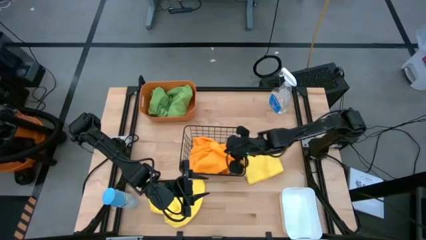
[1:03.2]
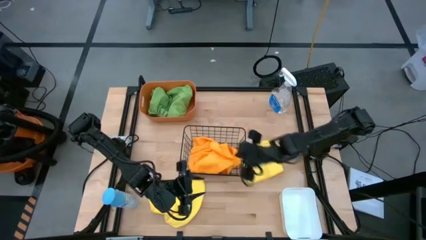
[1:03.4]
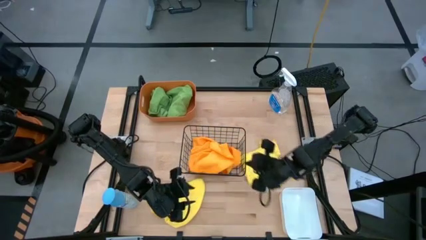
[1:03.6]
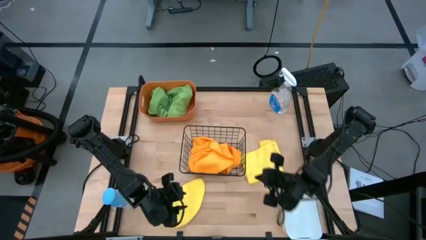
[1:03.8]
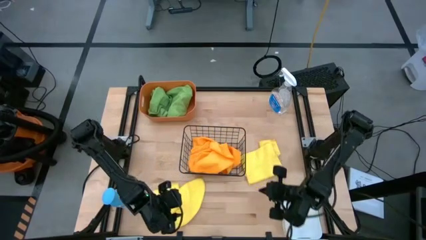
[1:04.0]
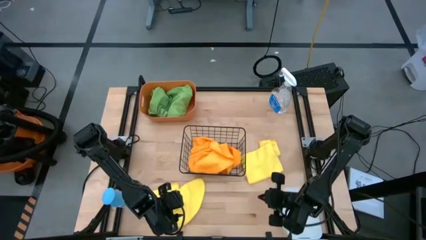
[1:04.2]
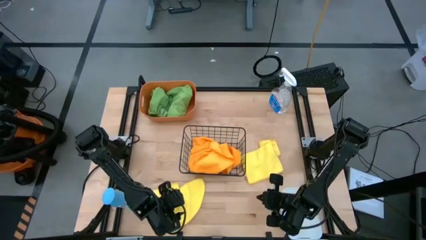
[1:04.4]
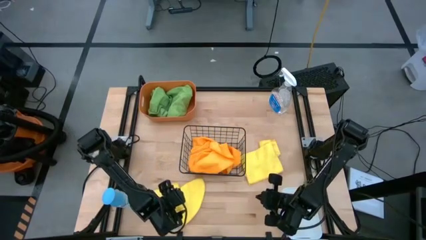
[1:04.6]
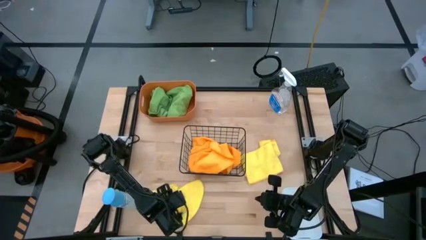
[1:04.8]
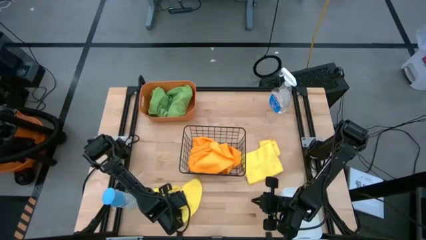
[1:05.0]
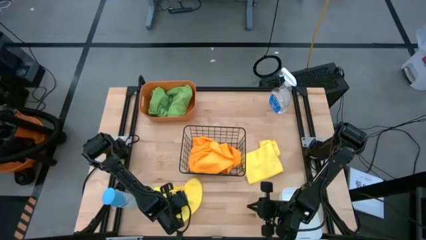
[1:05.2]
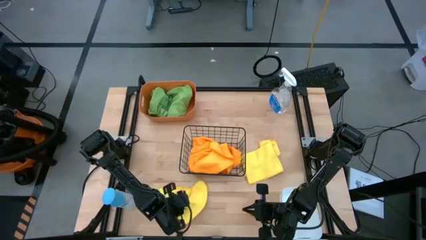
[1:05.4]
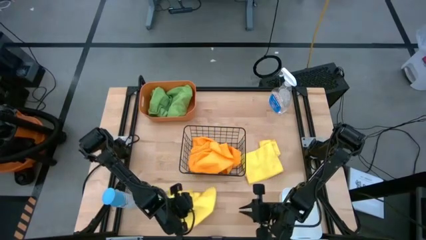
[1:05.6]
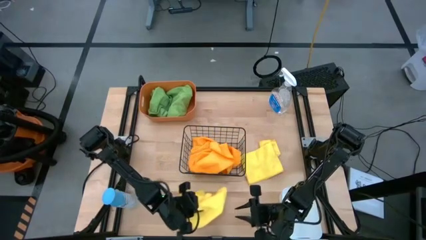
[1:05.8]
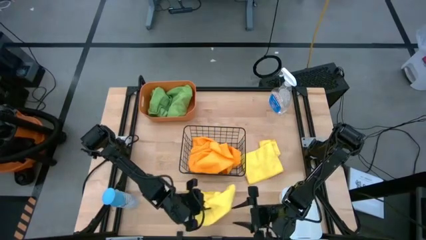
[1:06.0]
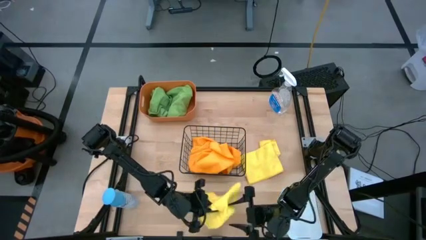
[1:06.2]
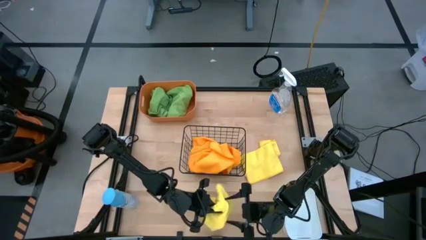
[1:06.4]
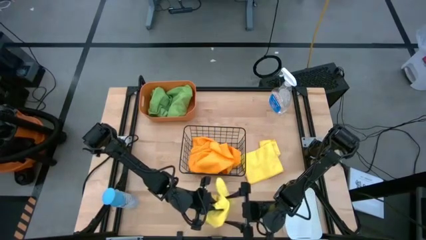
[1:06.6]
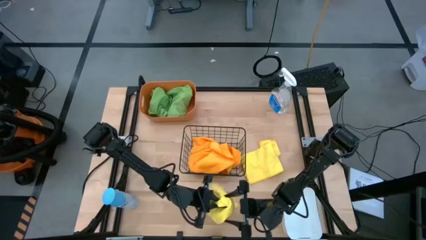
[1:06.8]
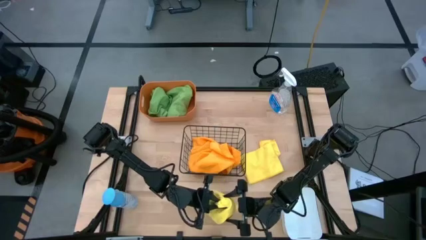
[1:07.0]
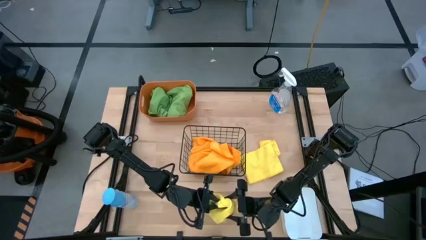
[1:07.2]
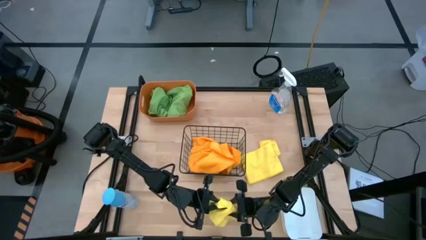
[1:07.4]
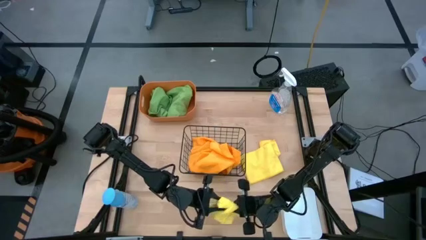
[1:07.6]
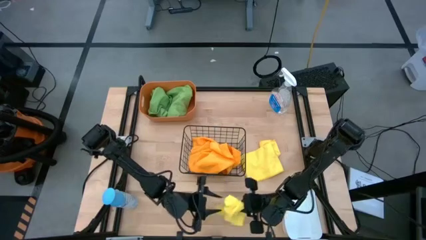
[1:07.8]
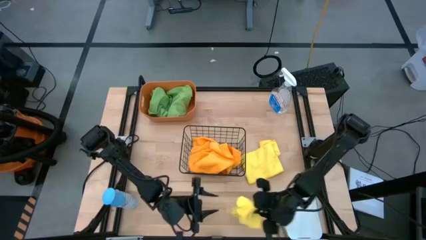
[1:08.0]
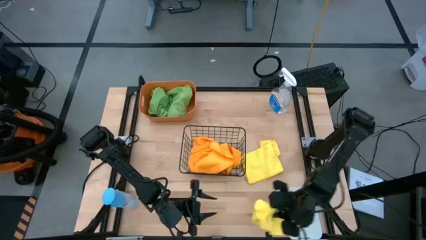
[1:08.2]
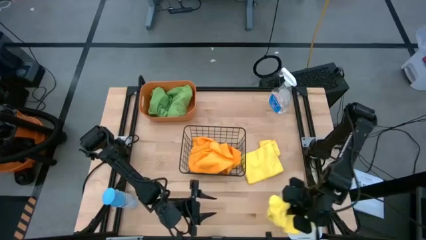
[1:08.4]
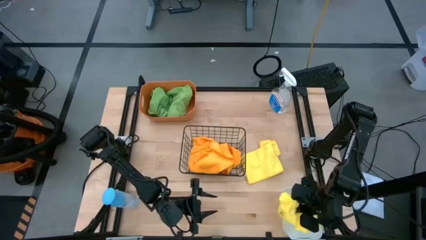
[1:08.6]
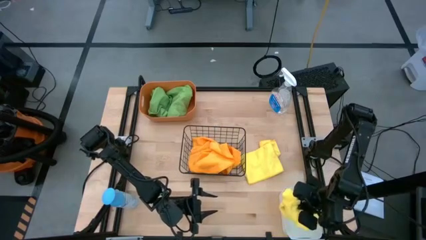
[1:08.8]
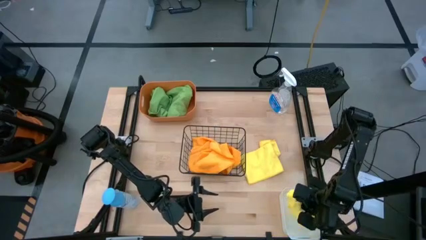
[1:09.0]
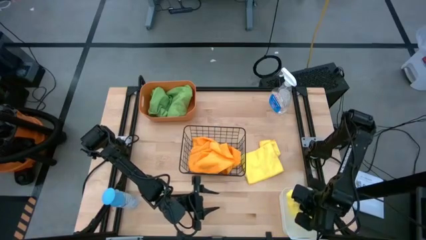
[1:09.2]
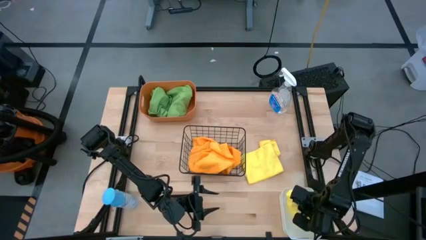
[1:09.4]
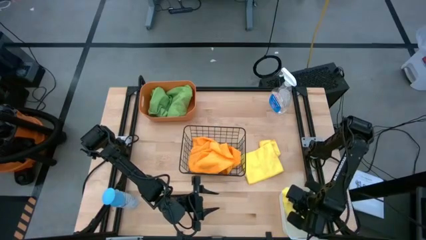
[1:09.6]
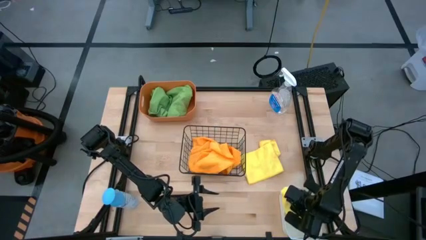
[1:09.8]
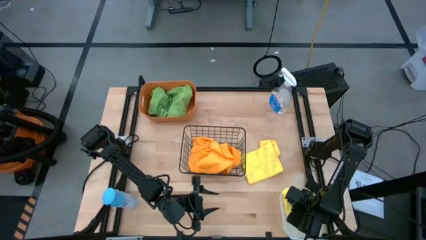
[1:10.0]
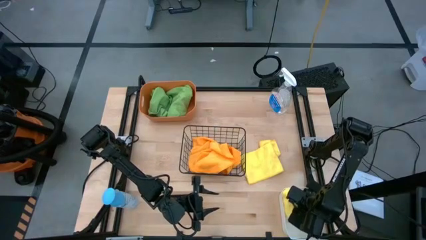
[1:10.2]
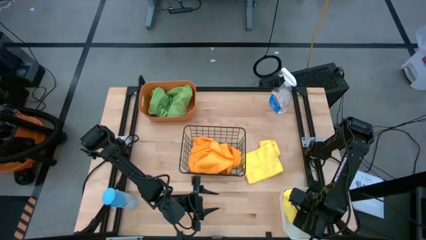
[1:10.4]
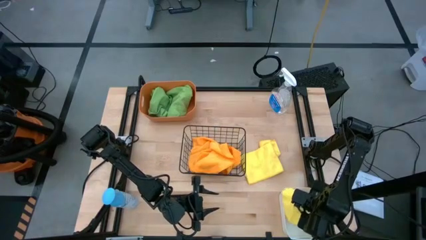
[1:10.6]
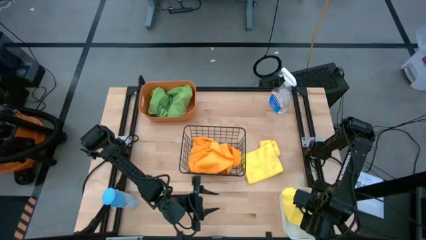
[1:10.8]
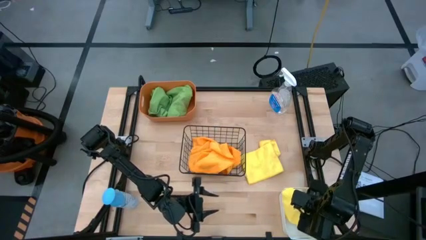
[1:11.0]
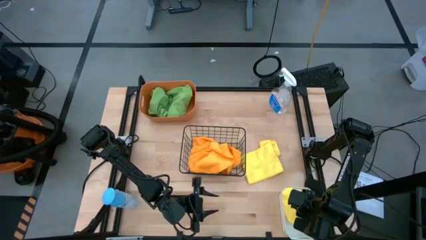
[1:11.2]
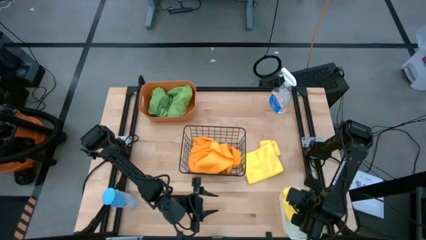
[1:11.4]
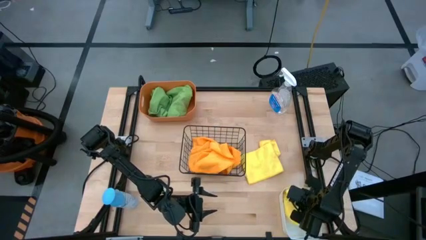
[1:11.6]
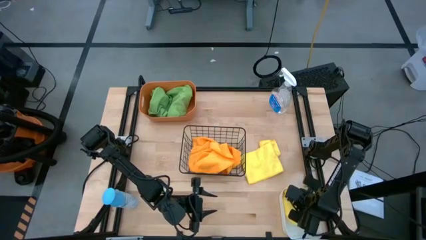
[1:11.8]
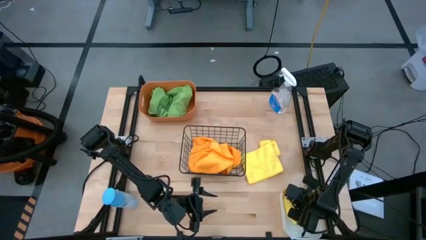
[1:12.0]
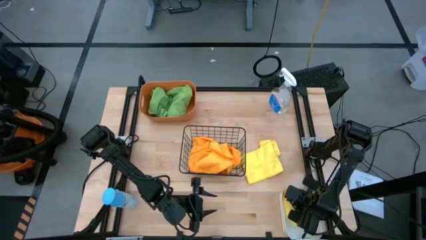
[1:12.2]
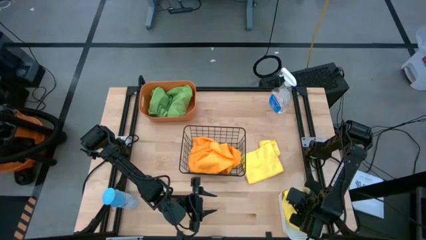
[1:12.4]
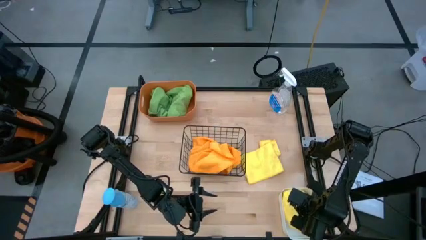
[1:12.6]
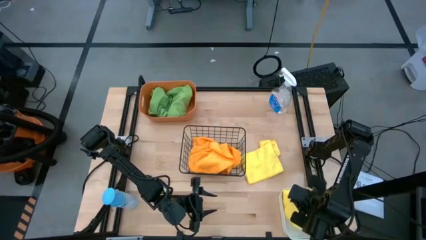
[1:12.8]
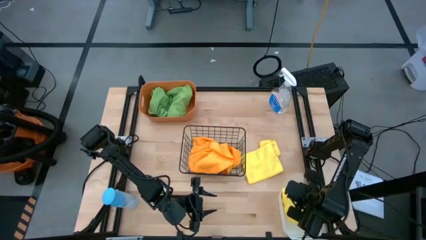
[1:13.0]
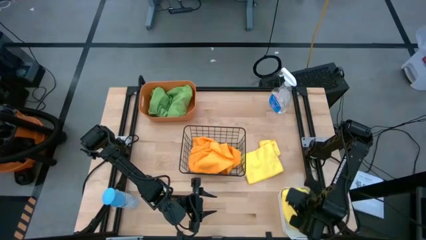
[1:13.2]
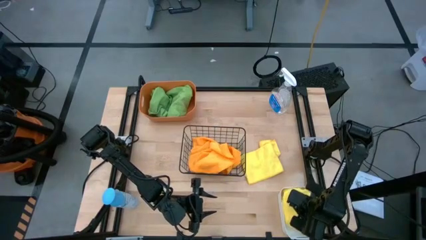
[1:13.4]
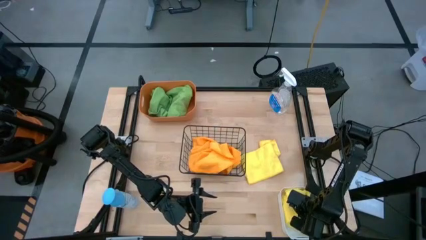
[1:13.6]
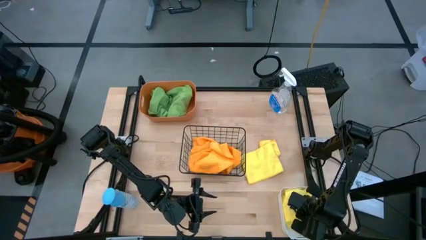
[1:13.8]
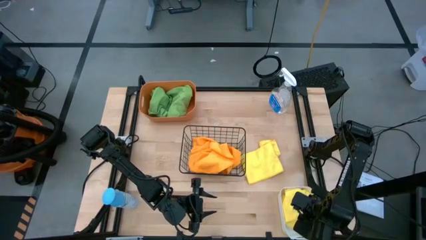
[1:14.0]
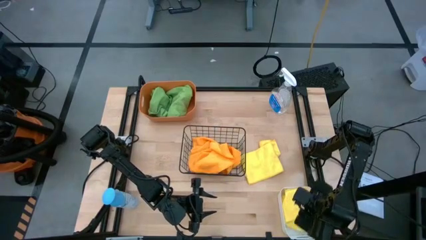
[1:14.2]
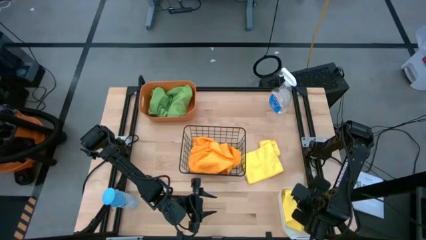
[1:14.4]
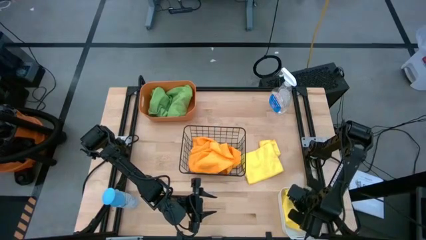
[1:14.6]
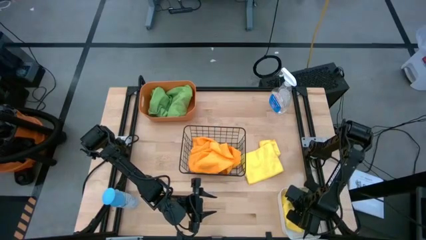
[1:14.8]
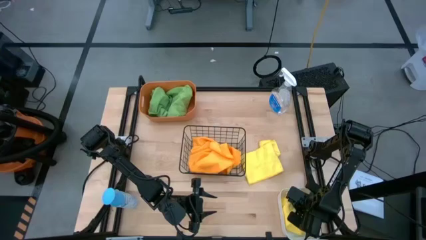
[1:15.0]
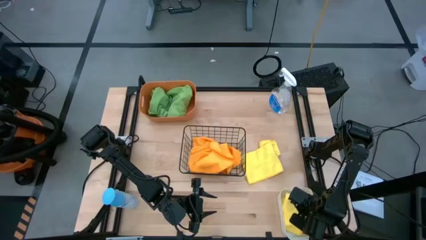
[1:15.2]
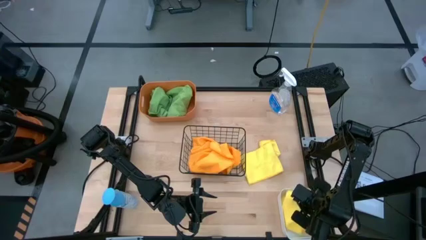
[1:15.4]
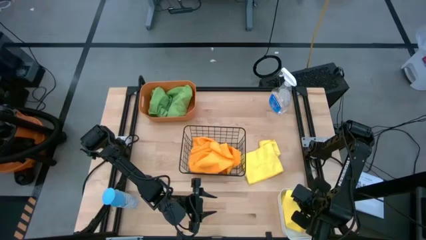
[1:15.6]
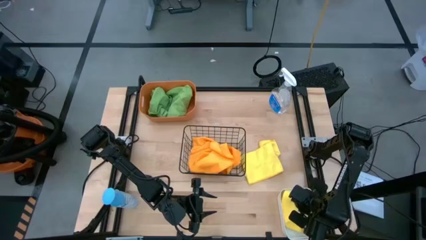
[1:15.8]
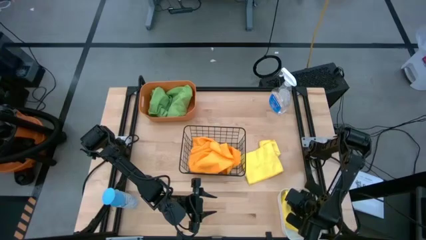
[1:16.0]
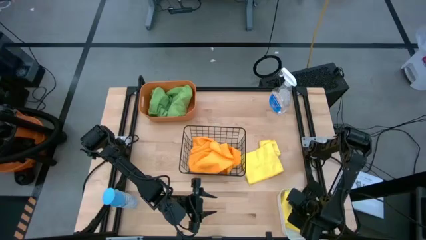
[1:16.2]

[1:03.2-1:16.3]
Task: Sort microfiber towel by color & place in baskets
Put the left yellow microfiber cloth into the white bin

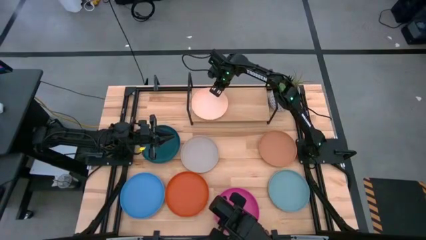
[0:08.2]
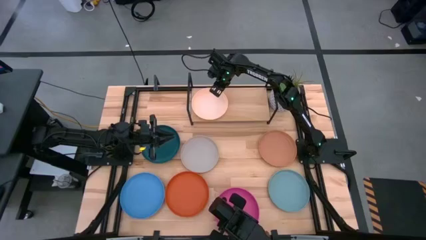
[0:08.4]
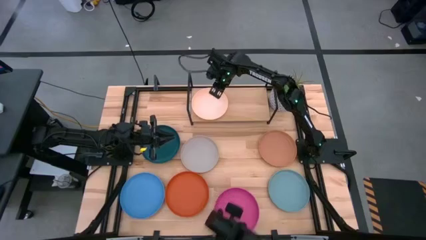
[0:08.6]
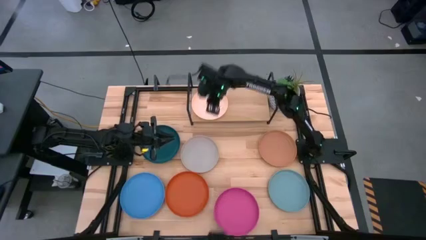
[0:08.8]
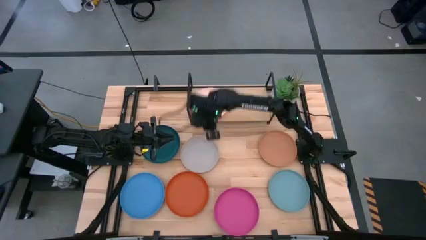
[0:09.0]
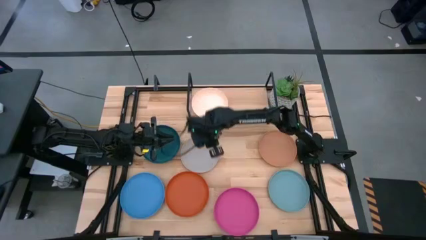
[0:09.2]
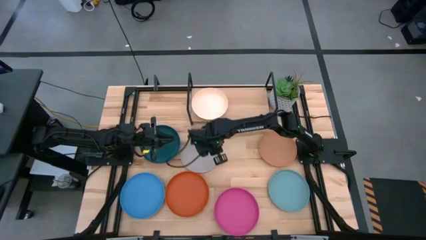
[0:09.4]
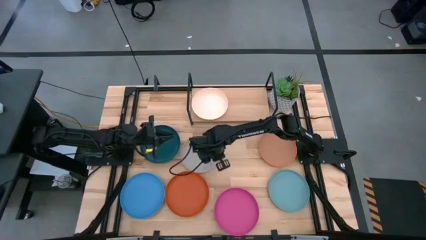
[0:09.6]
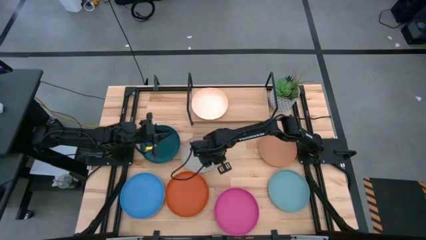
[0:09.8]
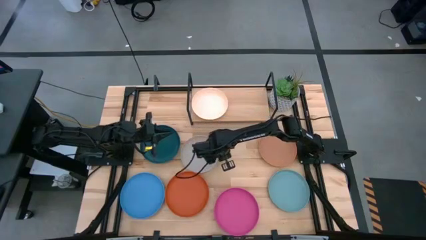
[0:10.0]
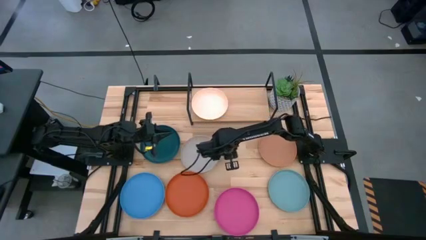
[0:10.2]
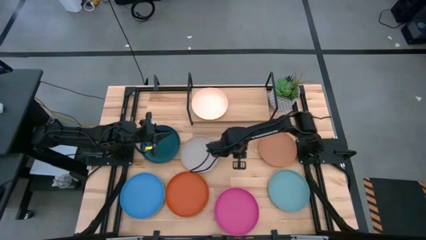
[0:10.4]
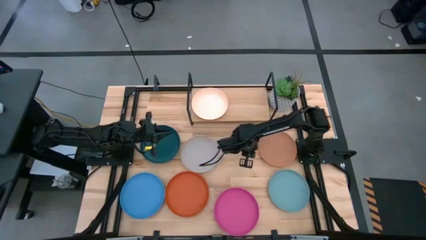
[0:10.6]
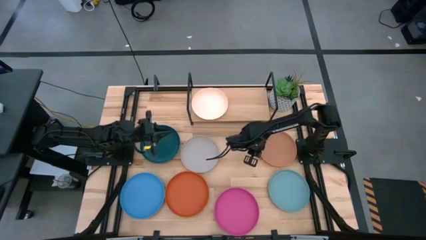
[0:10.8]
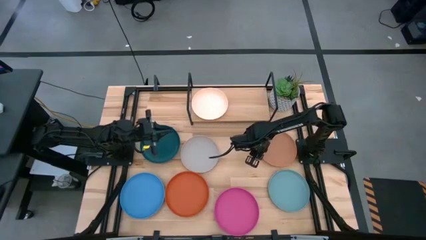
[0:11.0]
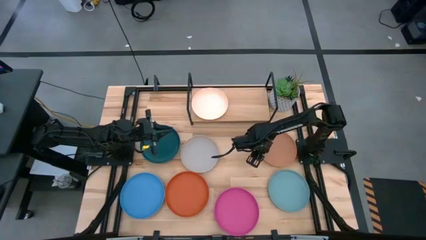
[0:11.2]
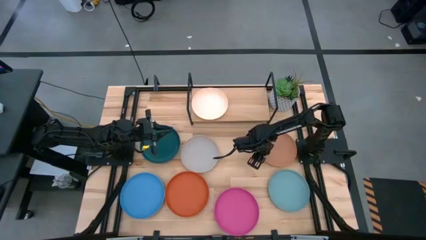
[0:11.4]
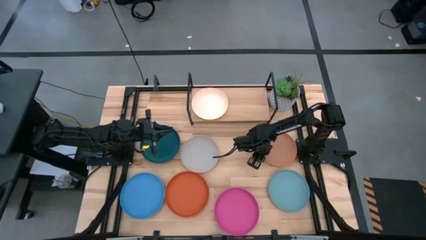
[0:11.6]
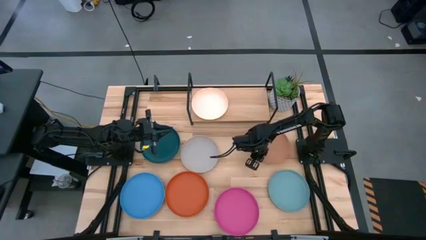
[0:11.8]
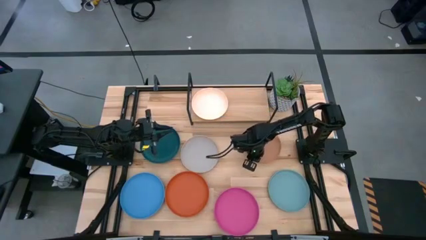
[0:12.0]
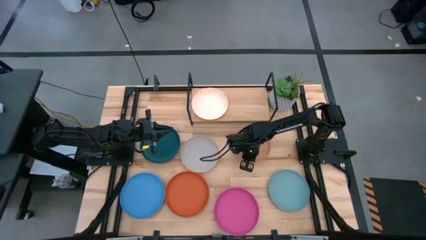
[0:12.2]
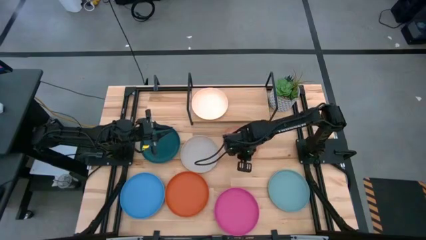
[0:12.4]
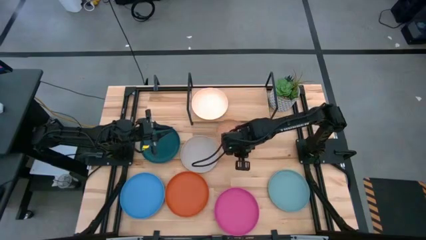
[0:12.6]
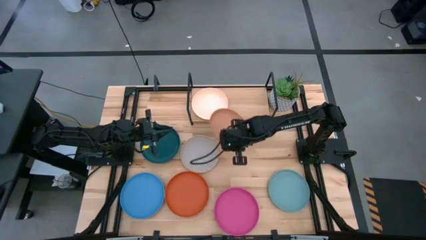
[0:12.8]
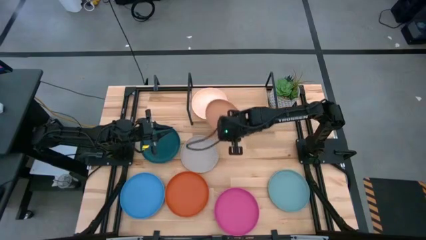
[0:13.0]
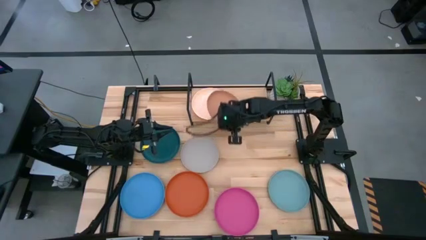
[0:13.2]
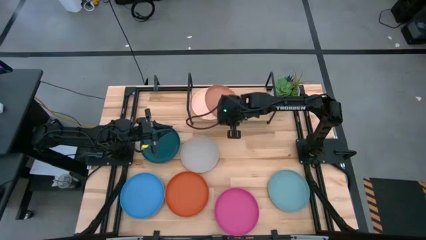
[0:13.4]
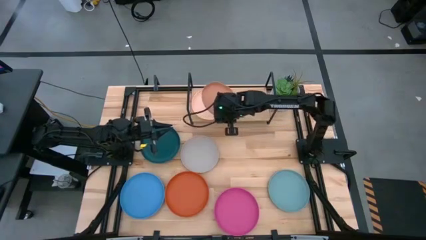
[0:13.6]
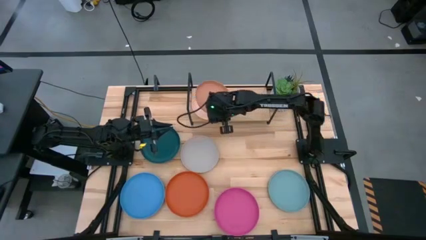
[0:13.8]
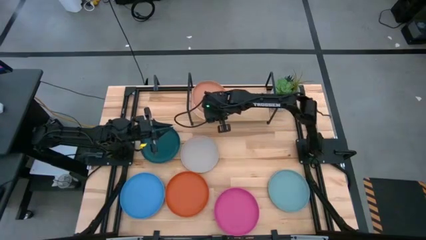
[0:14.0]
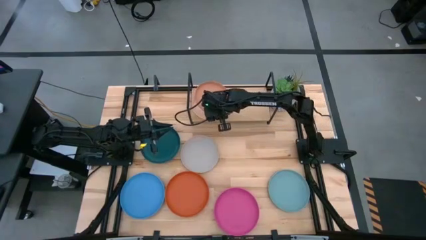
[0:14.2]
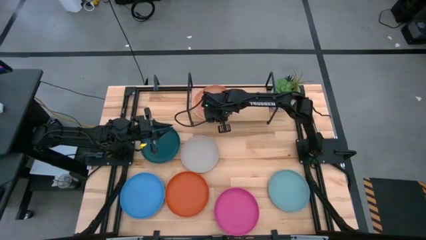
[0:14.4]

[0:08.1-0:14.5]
Task: Place and stack plates onto a shelf
Stack the brown plate on top of the light pink plate on the shelf
